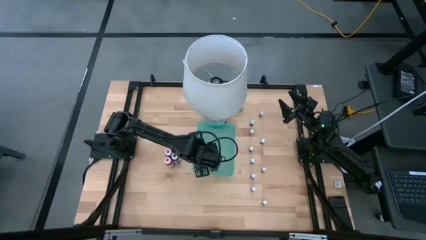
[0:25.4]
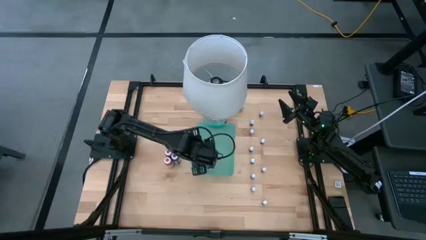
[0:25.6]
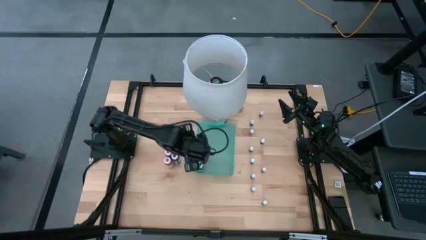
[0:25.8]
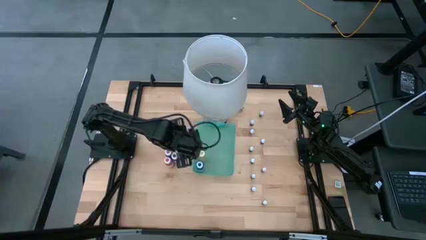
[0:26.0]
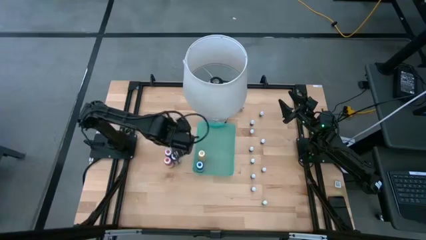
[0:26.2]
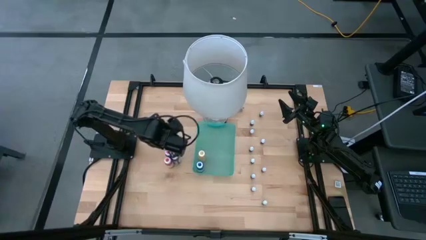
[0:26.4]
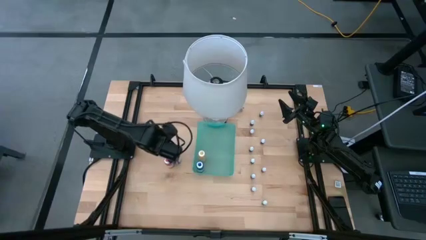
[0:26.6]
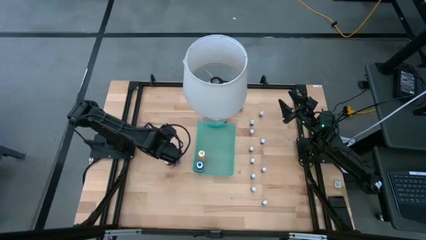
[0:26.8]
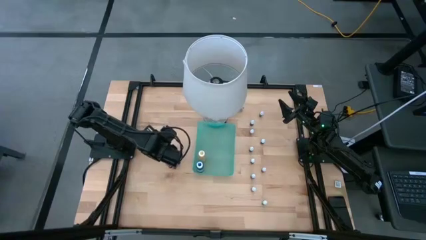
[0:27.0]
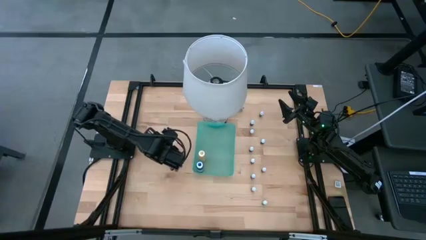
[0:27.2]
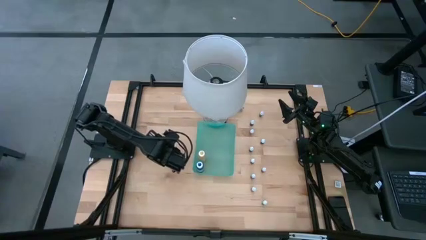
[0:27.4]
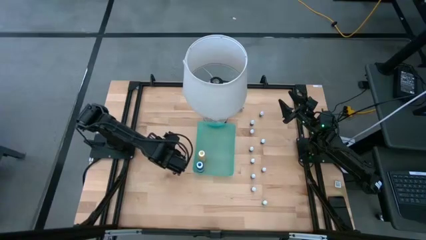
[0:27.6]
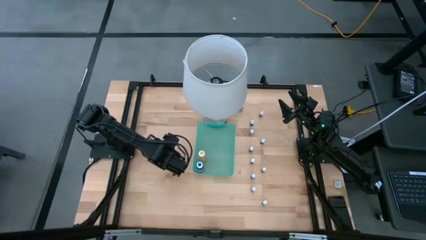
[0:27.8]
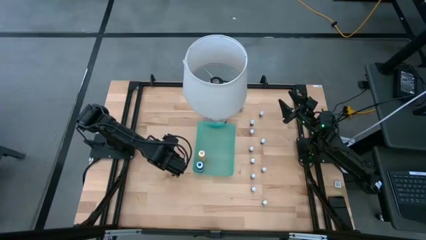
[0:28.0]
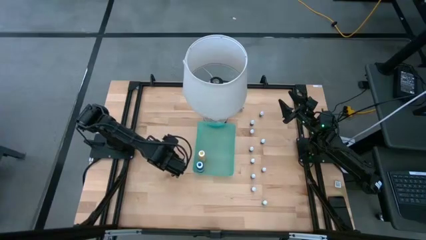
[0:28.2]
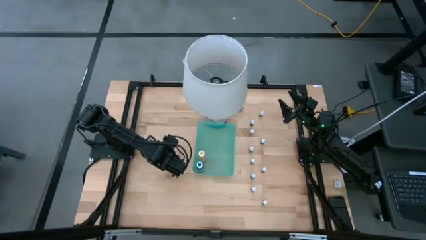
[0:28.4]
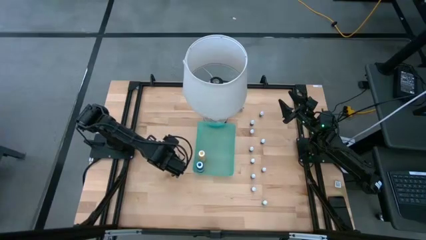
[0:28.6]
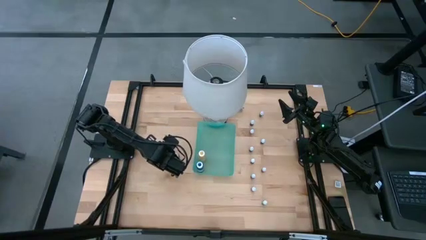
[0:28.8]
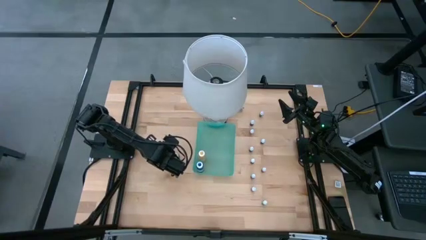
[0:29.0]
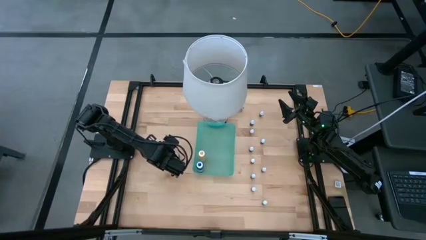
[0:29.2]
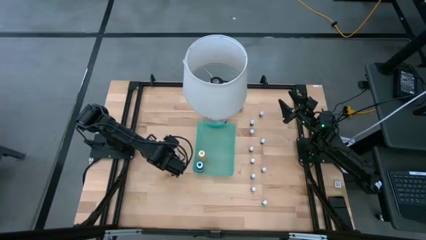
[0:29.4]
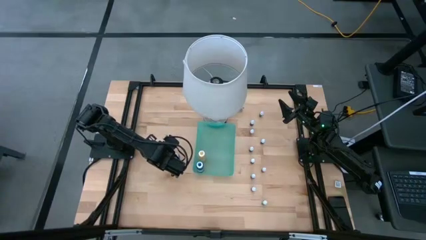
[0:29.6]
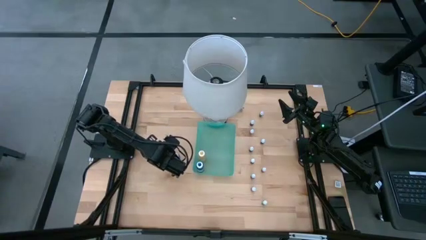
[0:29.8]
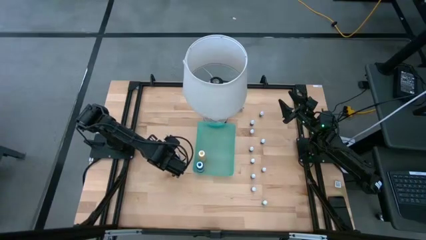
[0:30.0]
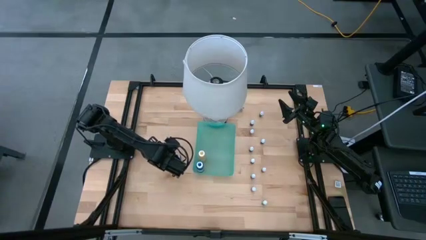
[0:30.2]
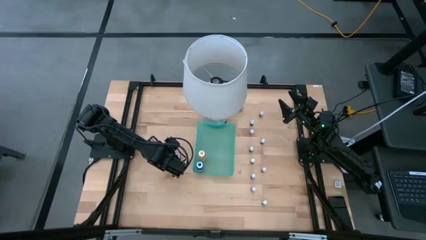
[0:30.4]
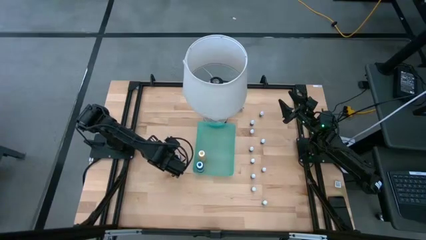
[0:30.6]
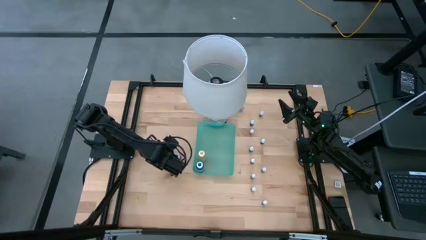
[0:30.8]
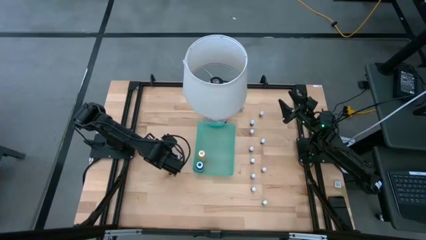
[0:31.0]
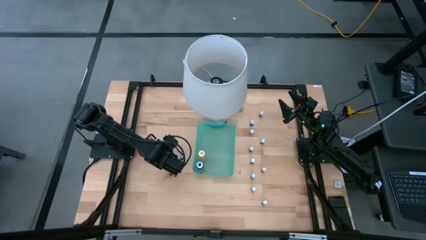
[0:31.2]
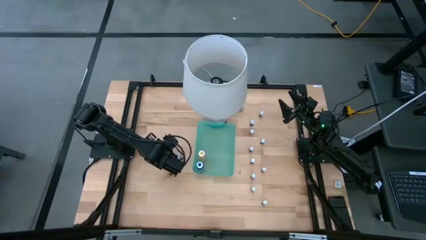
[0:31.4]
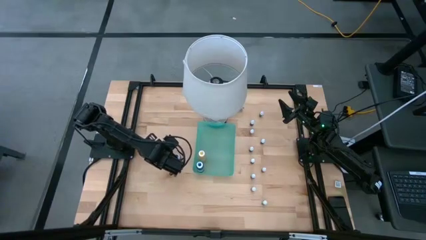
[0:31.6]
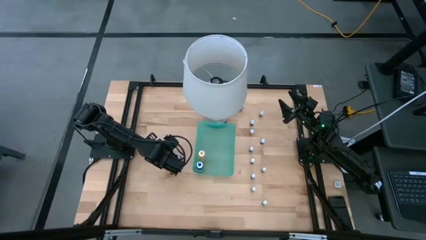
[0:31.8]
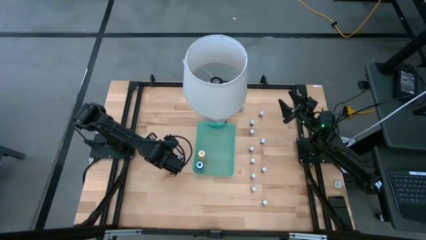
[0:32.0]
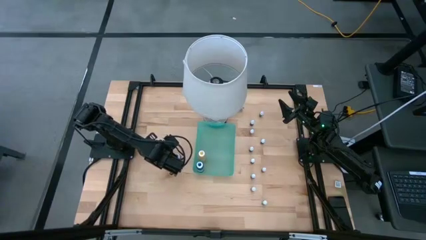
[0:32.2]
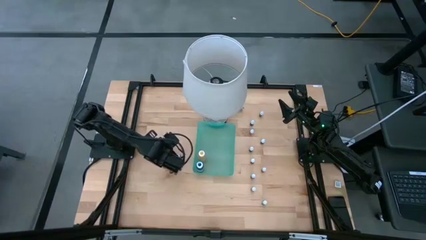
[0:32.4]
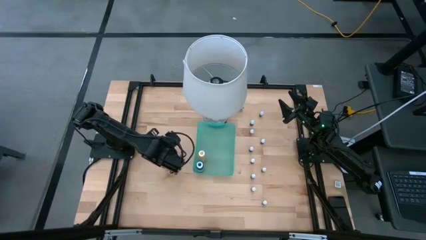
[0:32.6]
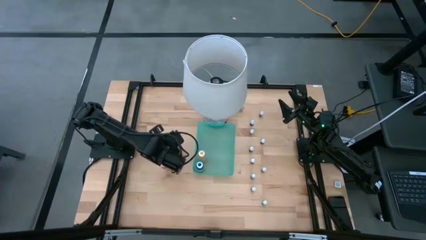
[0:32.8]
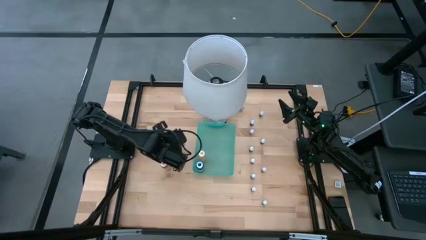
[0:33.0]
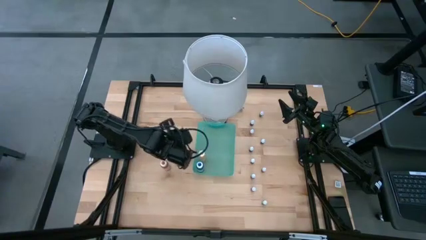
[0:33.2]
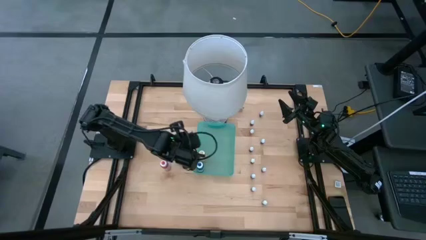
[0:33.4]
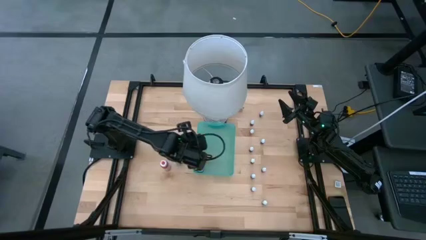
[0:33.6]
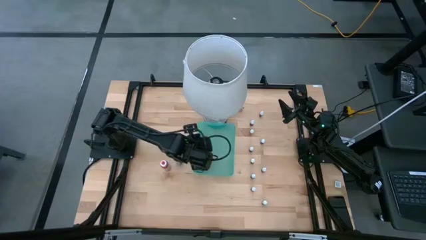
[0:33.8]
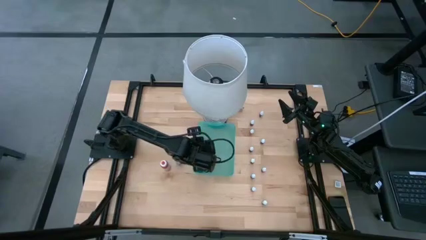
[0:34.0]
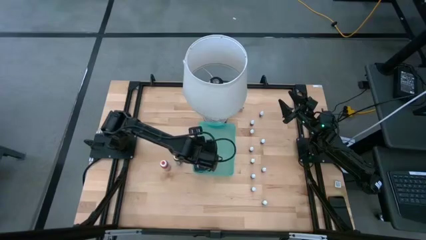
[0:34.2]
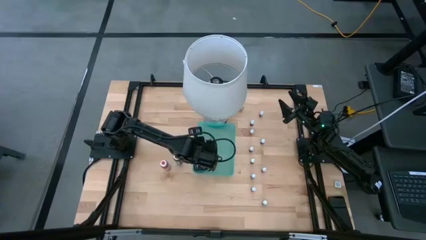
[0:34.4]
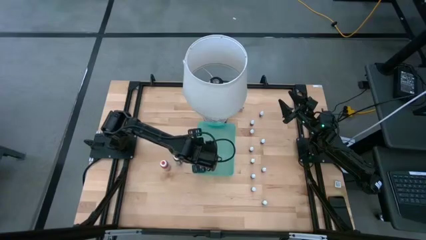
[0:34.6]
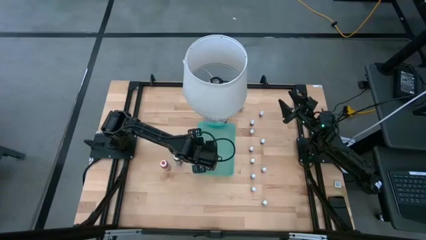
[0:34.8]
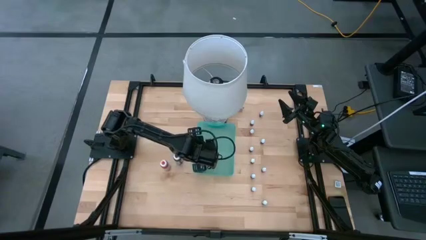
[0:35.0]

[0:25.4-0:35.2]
Task: Pick & Place food coloring
Put the large red food coloring bottle into the green bin

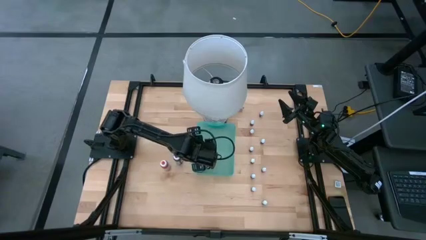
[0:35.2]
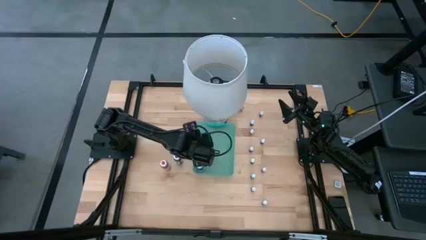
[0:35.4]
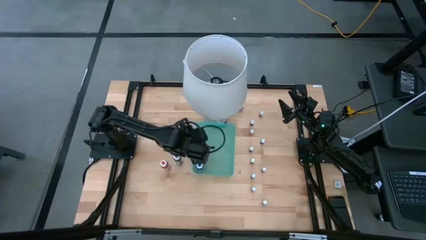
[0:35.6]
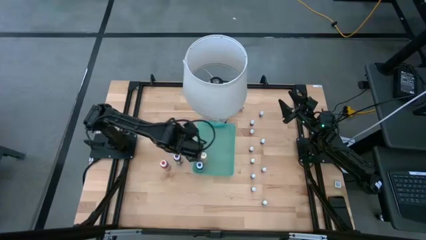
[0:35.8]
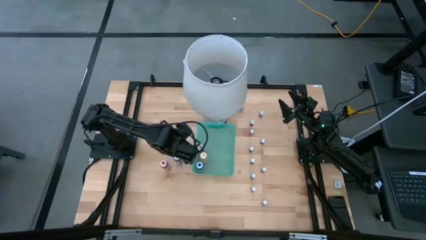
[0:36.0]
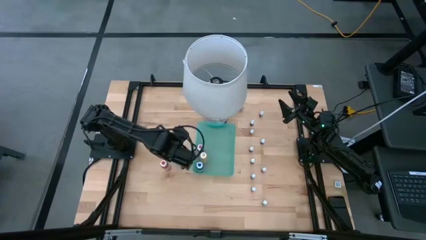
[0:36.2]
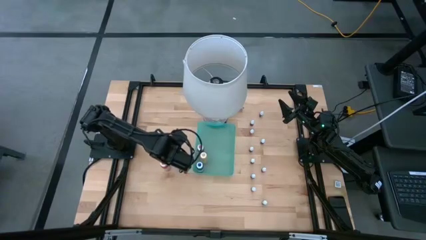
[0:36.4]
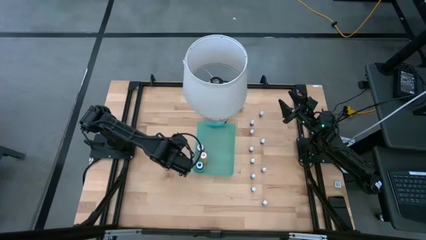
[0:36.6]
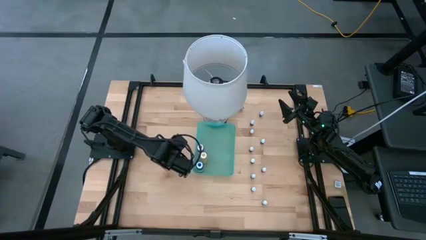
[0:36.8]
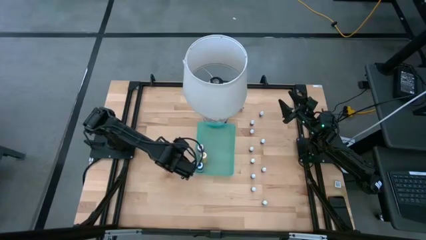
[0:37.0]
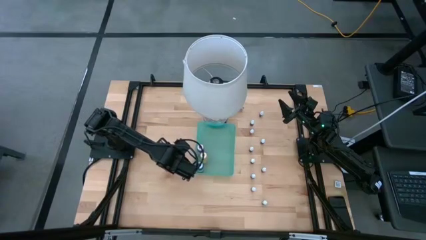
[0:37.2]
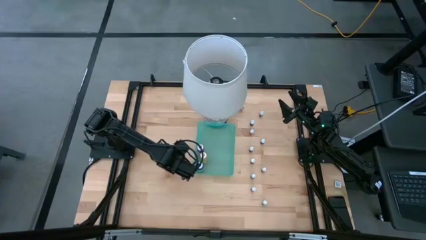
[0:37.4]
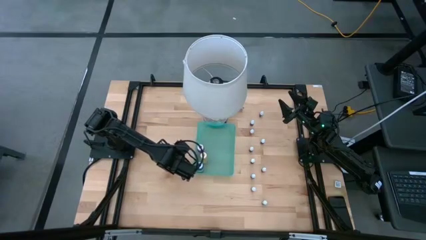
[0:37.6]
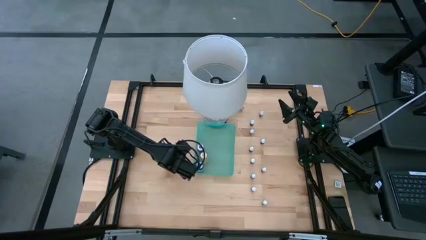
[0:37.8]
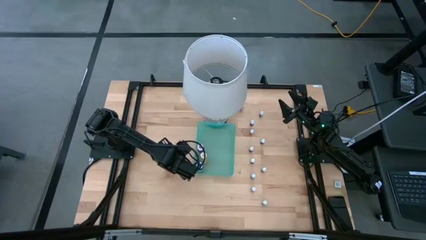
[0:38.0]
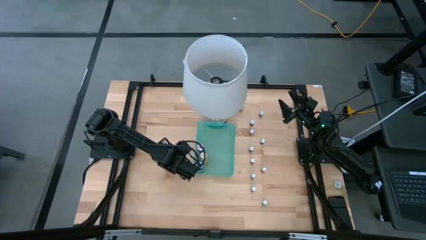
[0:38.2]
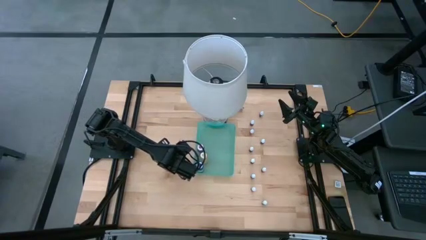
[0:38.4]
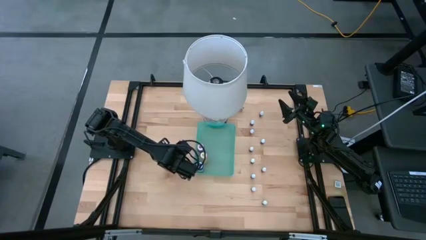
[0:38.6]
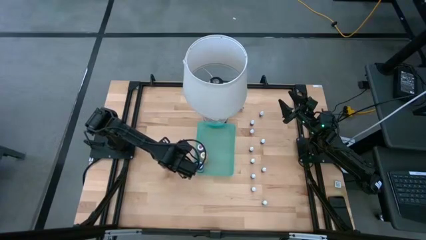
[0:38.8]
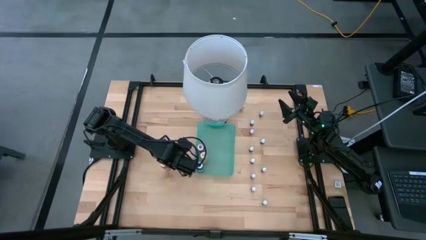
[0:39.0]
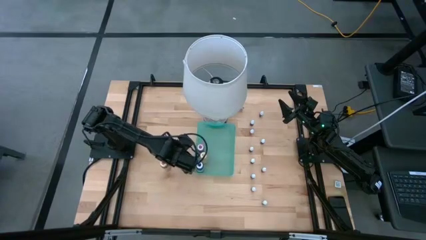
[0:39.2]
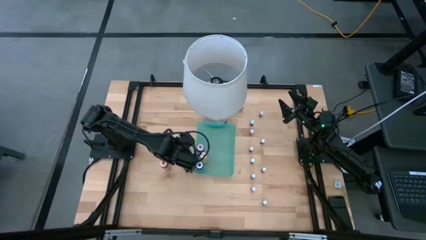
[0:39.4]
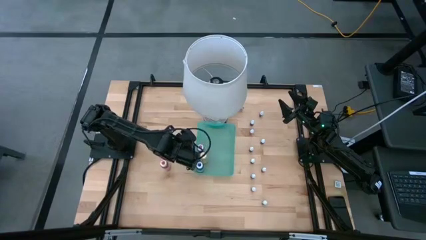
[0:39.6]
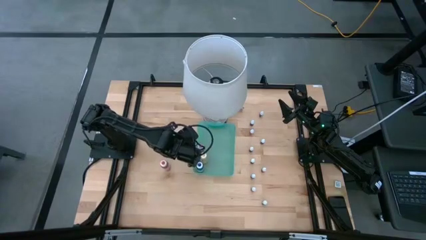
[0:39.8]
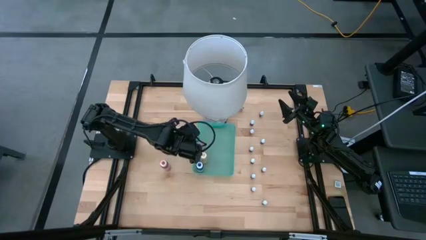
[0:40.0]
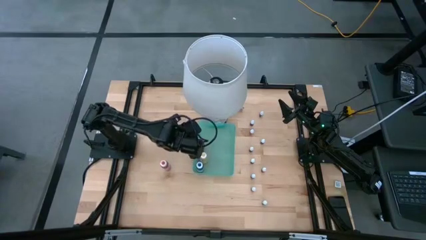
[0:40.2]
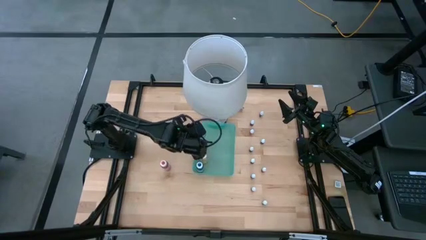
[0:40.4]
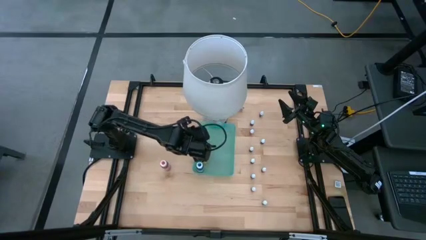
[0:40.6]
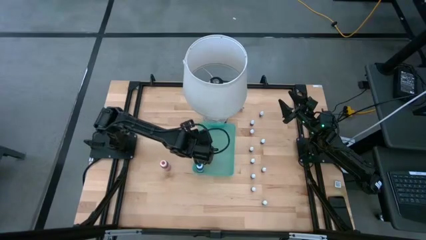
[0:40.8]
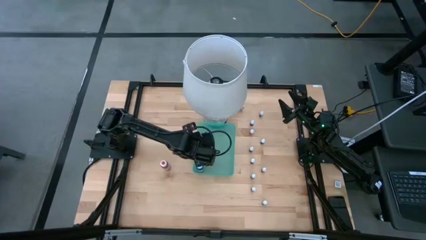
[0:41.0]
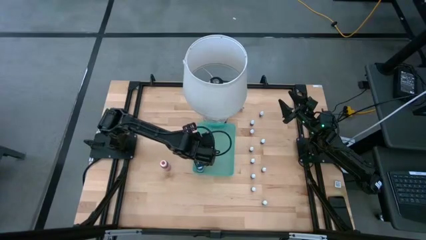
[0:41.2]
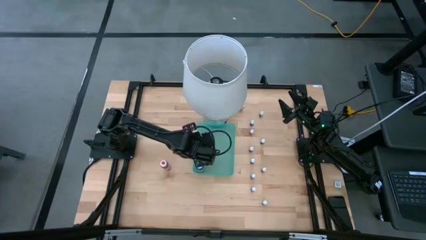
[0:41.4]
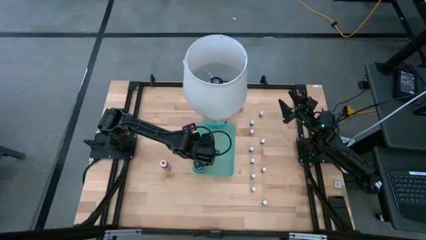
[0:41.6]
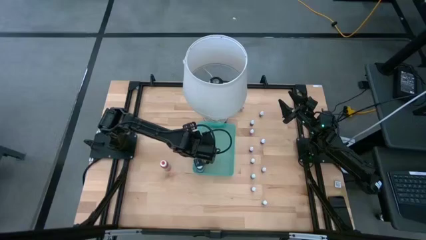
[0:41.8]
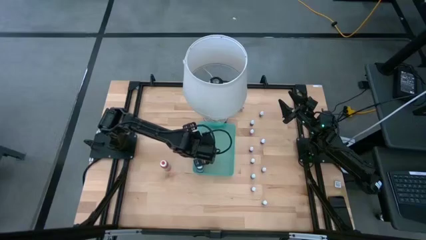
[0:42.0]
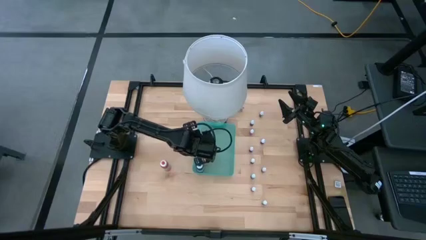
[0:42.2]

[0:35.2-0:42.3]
Put the large black food coloring bottle into the green bin
